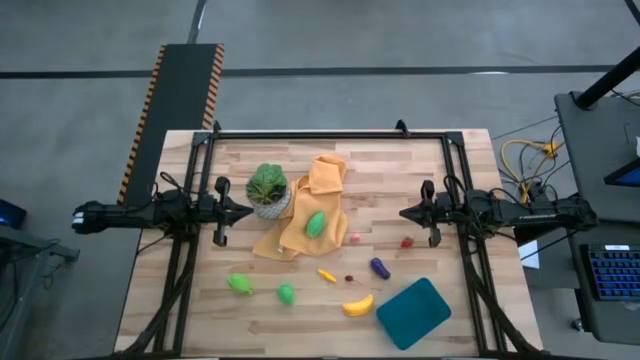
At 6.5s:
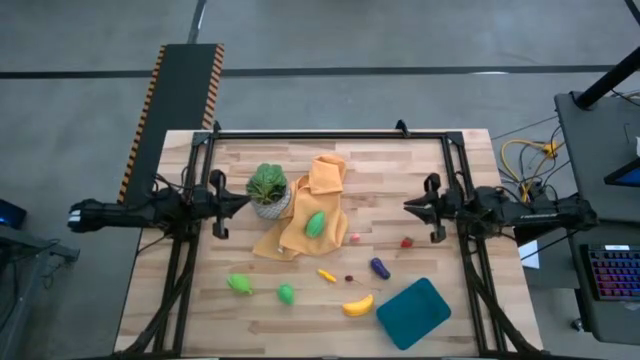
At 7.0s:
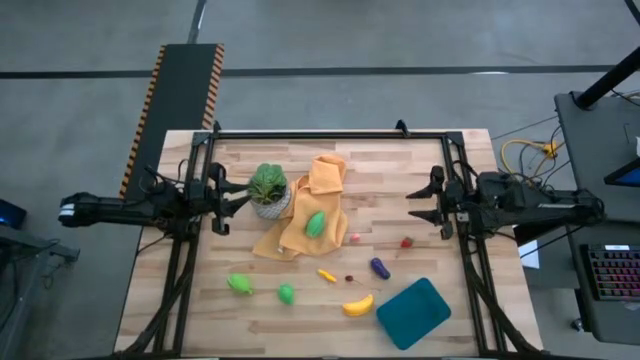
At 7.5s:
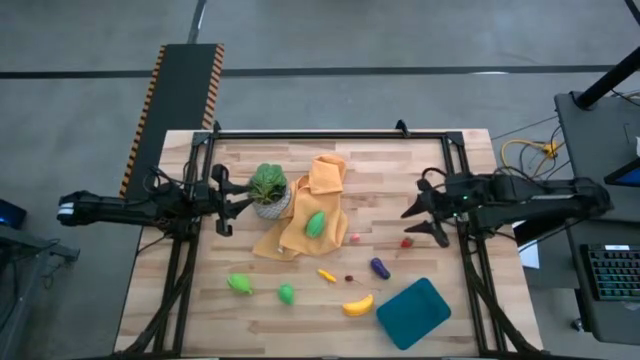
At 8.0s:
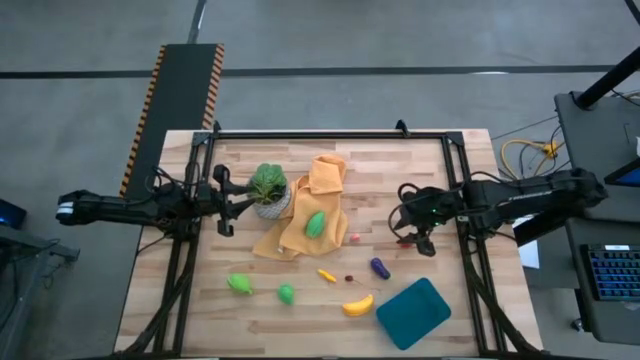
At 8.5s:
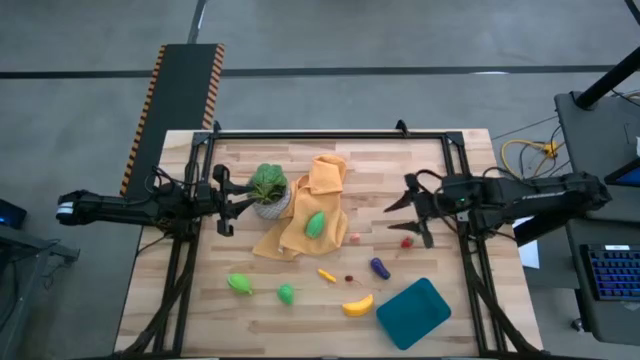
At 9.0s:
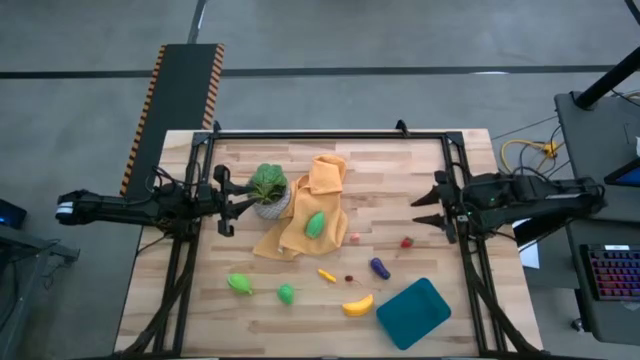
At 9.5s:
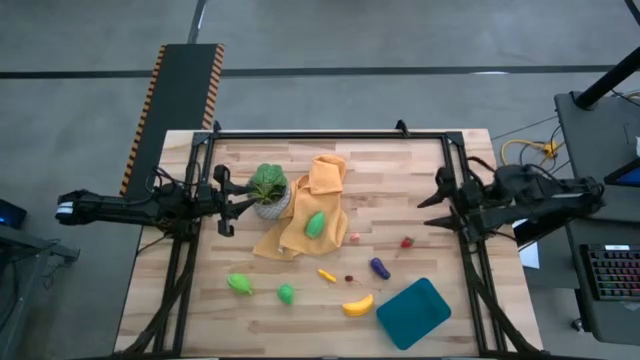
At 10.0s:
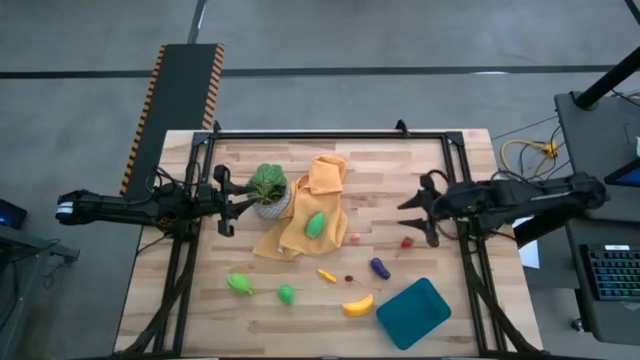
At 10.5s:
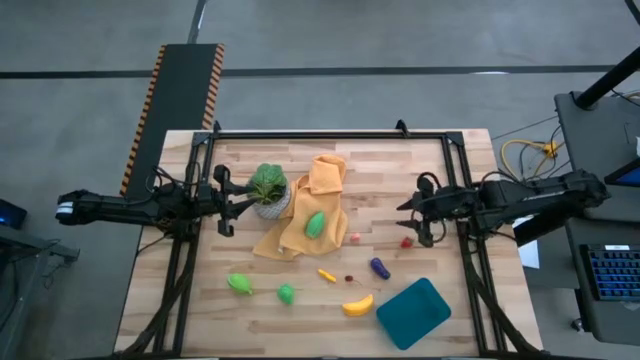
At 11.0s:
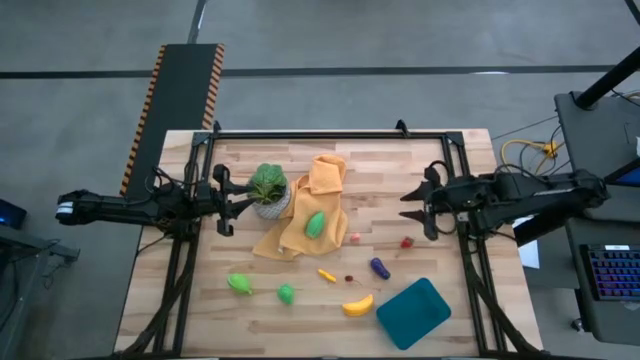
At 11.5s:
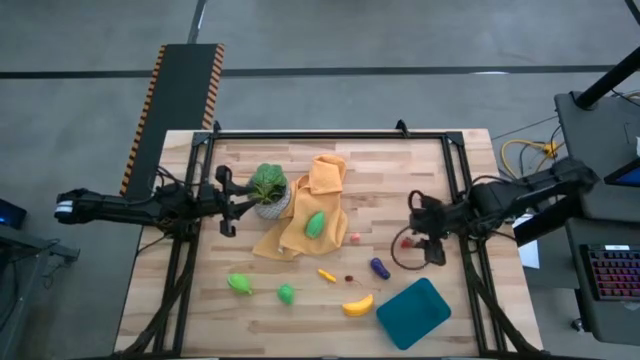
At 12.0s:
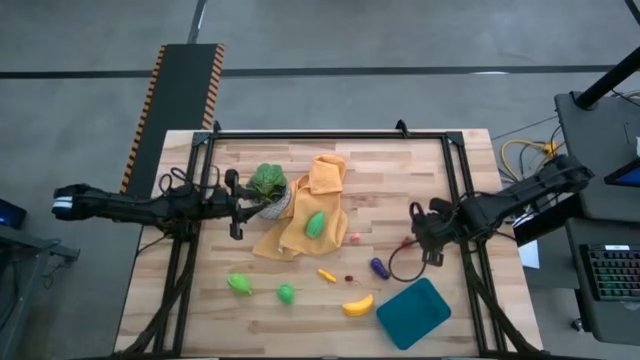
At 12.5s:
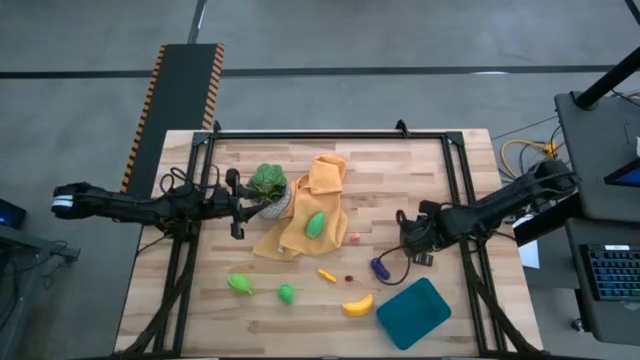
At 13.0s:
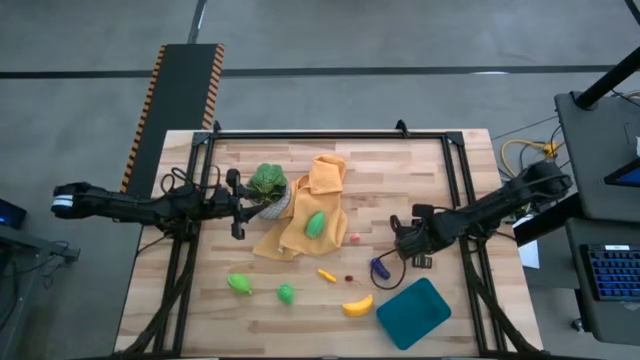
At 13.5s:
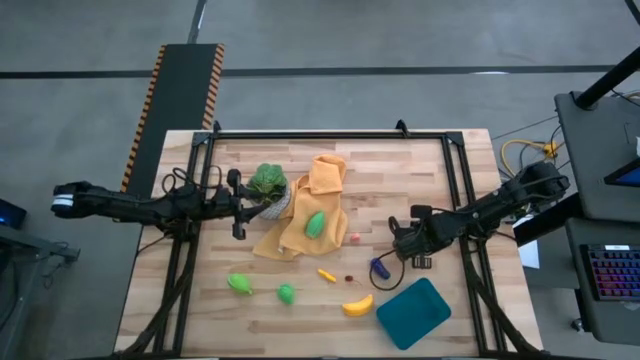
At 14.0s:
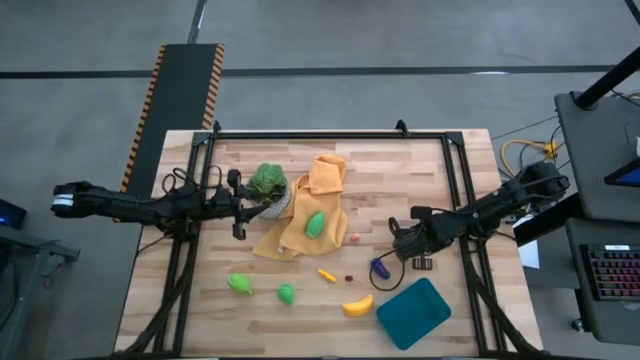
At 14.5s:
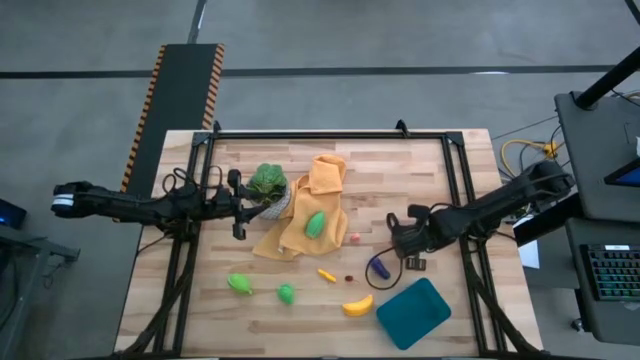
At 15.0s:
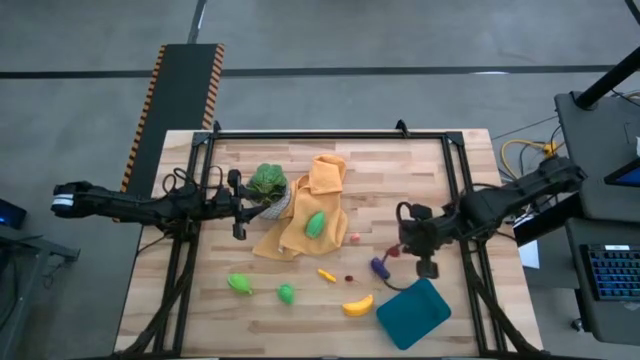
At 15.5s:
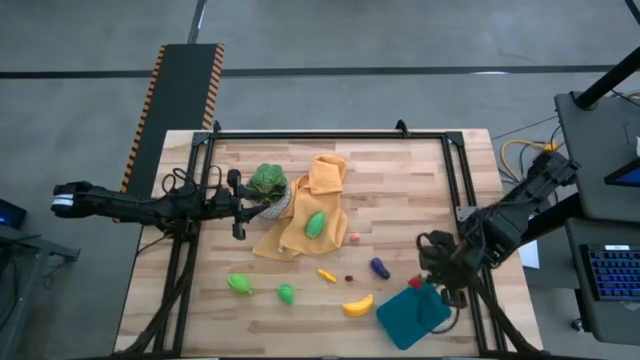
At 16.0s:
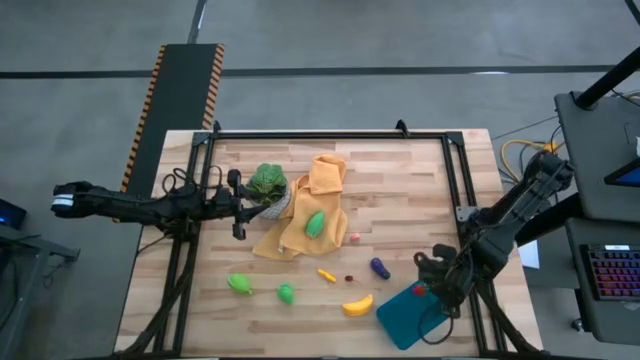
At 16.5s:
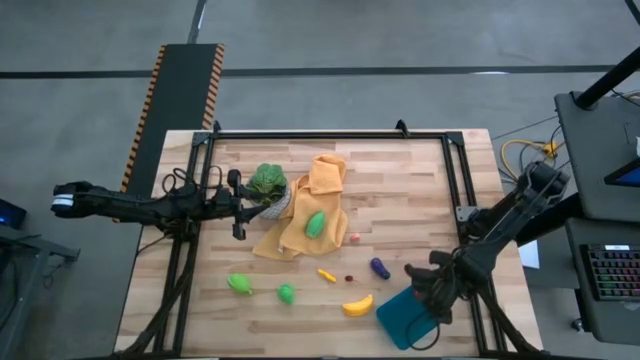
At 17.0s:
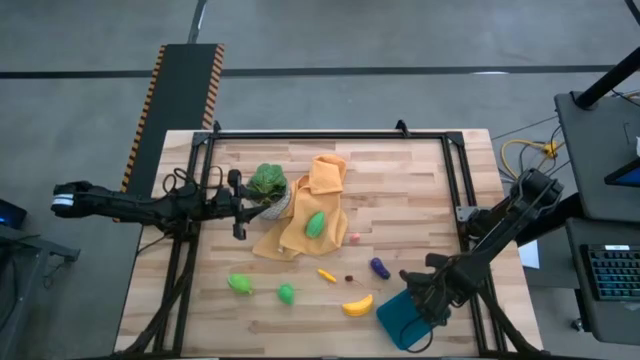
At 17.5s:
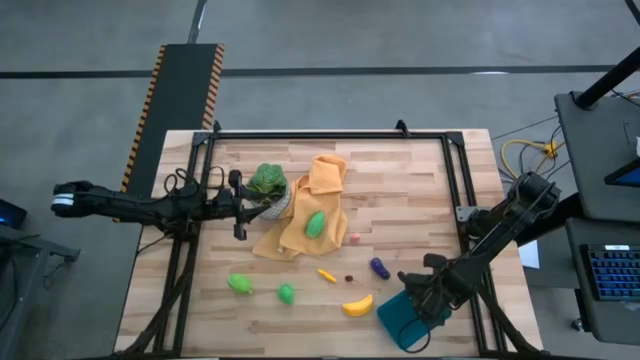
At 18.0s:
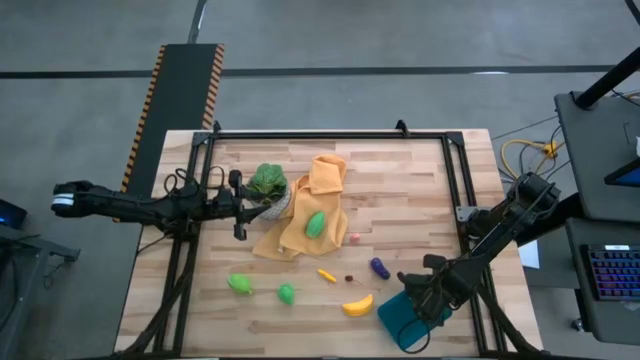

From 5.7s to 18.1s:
Task: Pick and placing Produce into tupperware
Put the strawberry into the blue bin

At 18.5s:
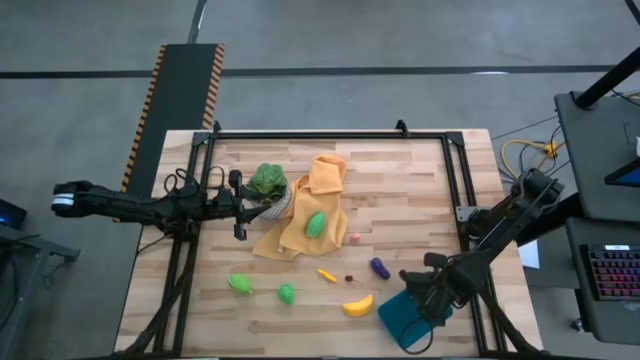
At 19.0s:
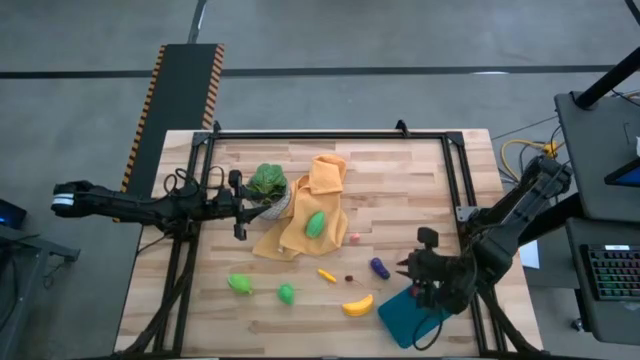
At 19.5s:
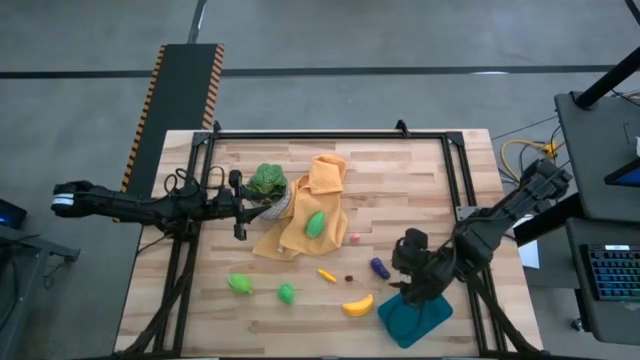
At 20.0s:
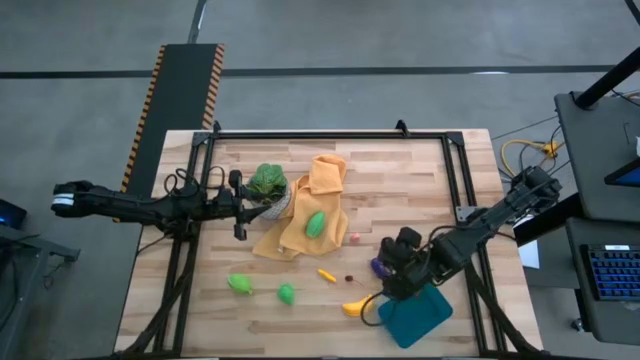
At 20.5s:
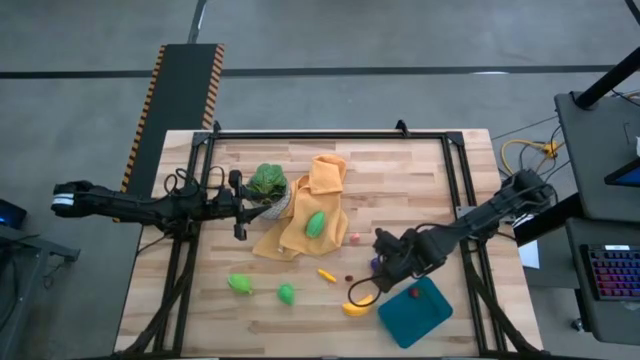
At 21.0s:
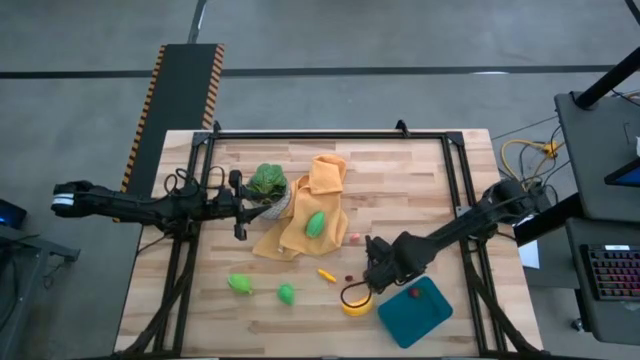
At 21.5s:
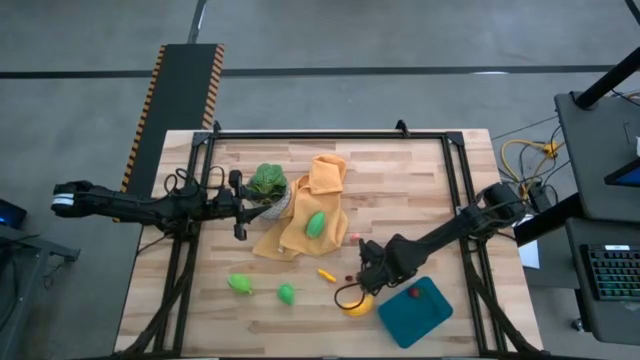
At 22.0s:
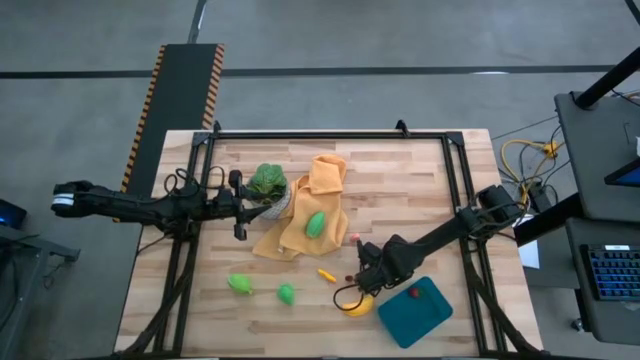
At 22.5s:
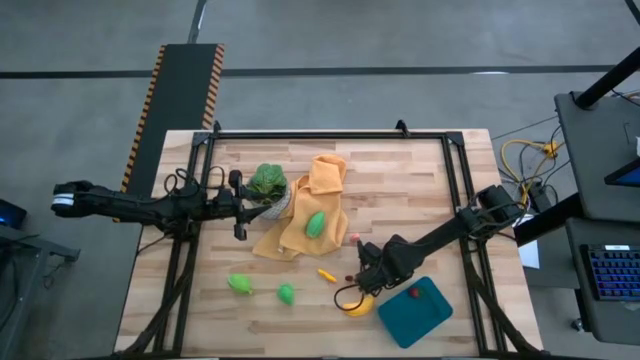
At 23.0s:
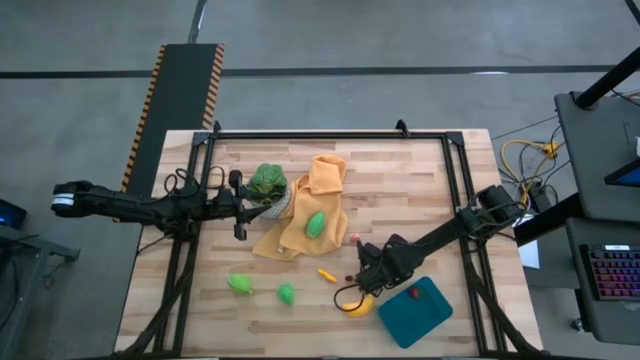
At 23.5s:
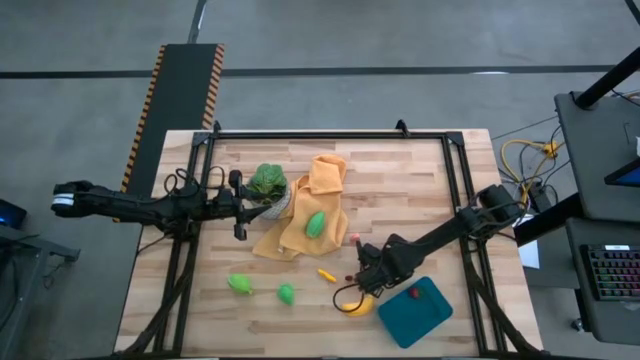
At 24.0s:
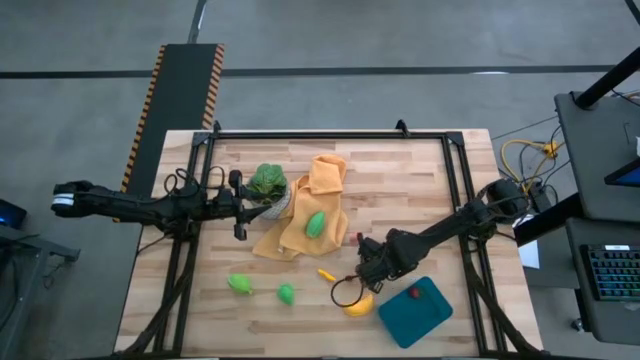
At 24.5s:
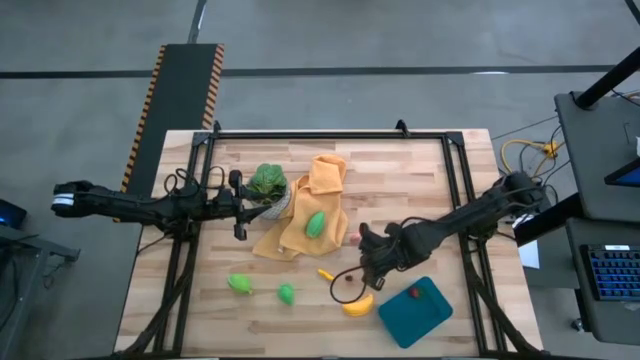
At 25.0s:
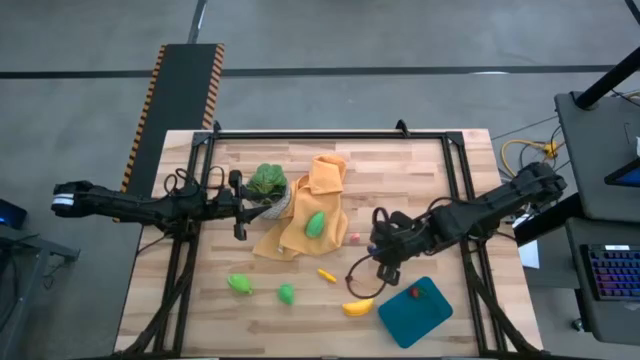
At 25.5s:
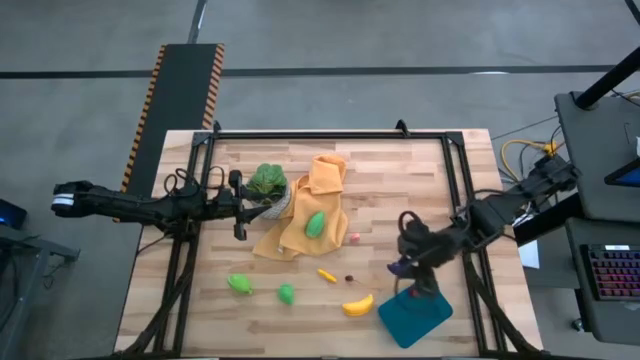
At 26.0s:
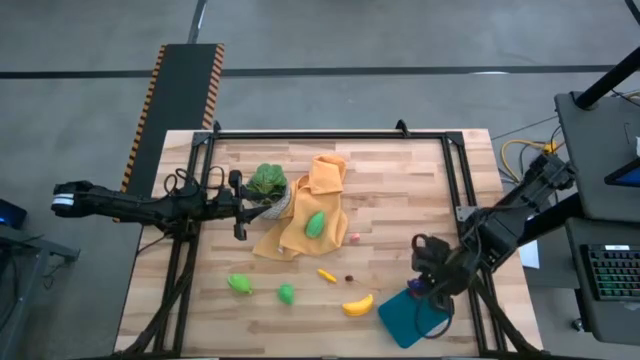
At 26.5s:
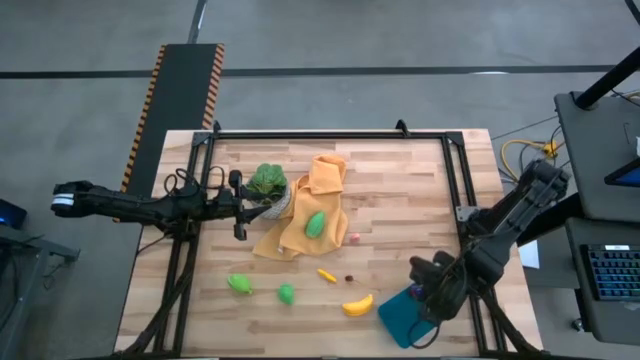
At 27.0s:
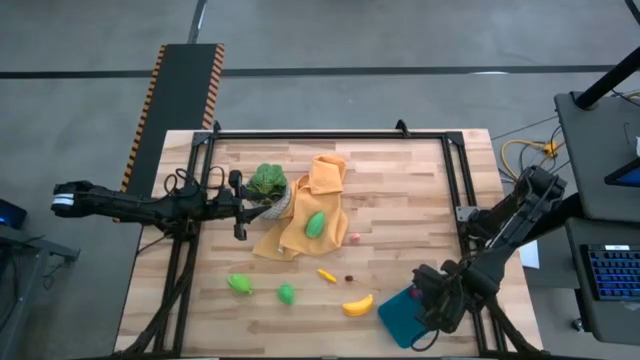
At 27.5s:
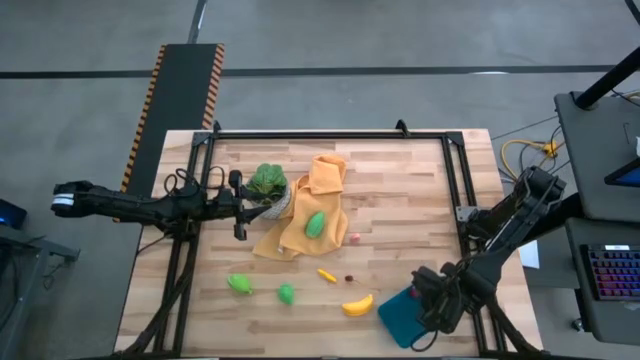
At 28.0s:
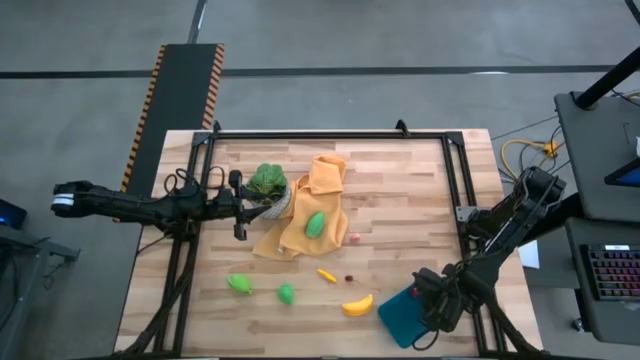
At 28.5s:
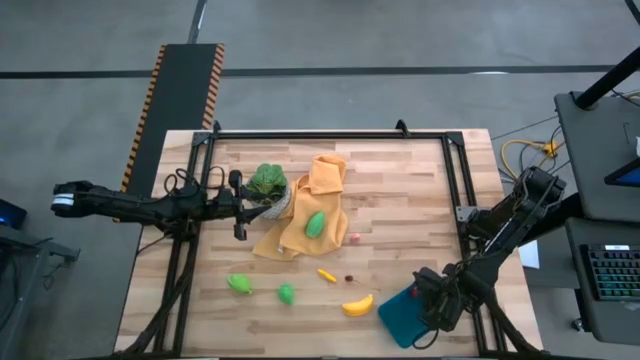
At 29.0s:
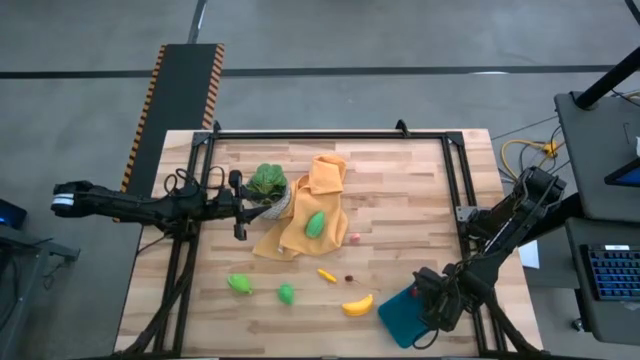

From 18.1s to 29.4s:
Put the eggplant into the blue bin
